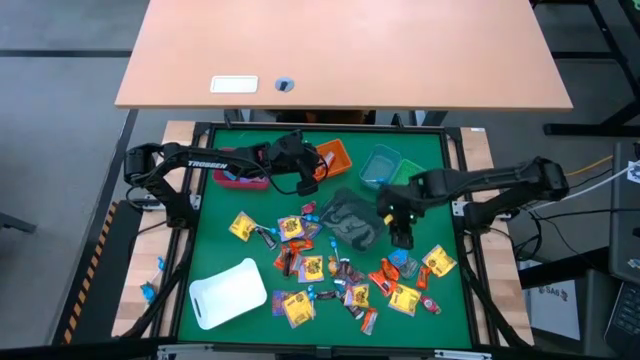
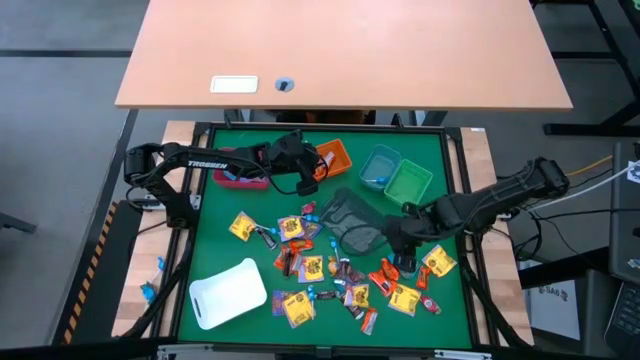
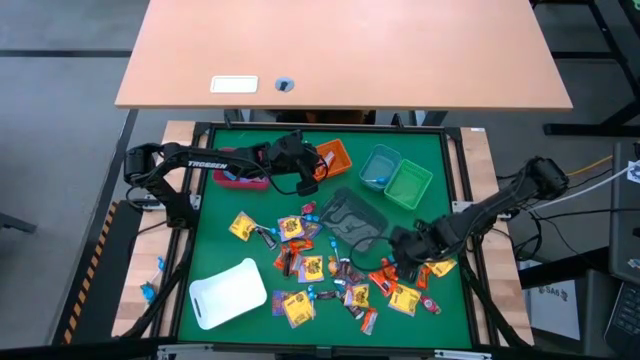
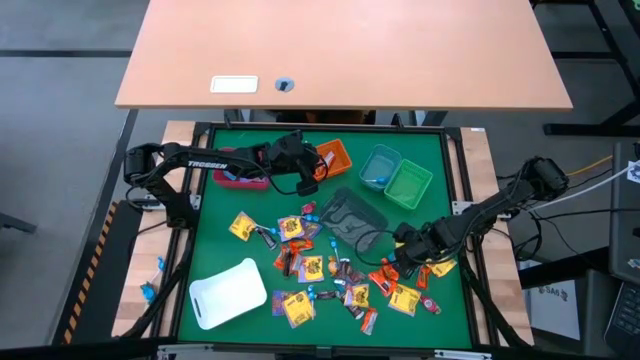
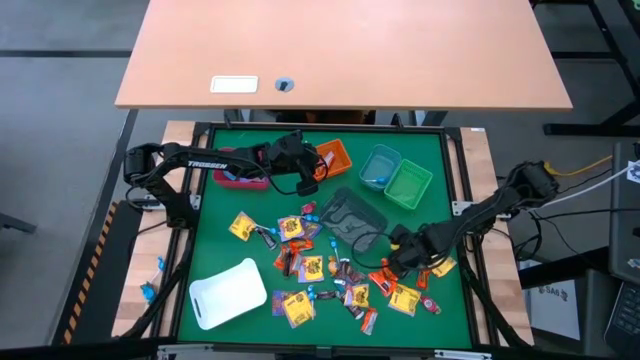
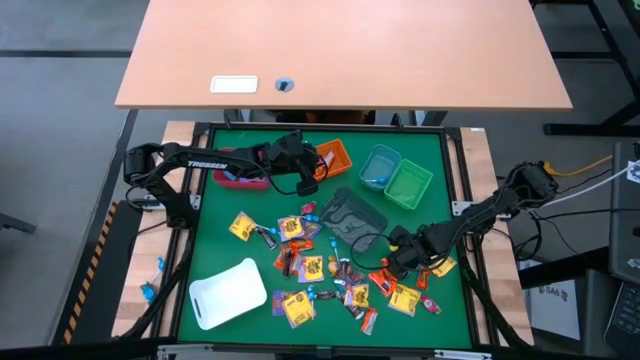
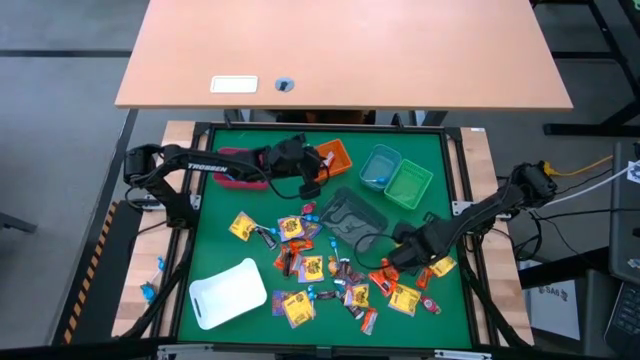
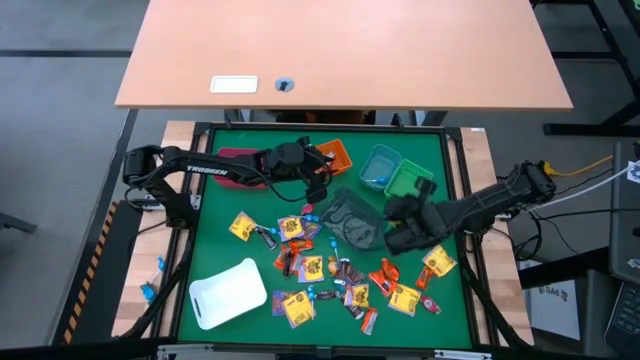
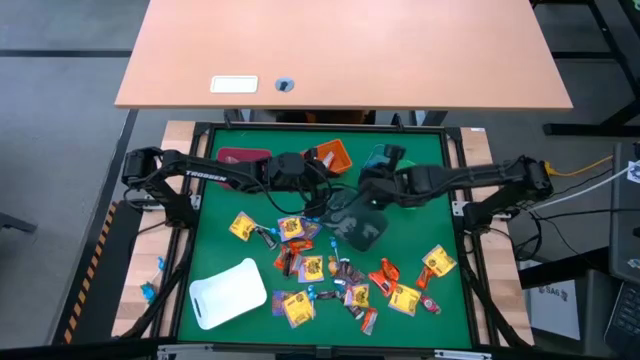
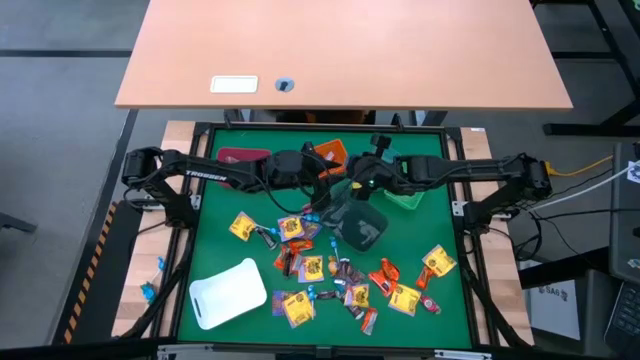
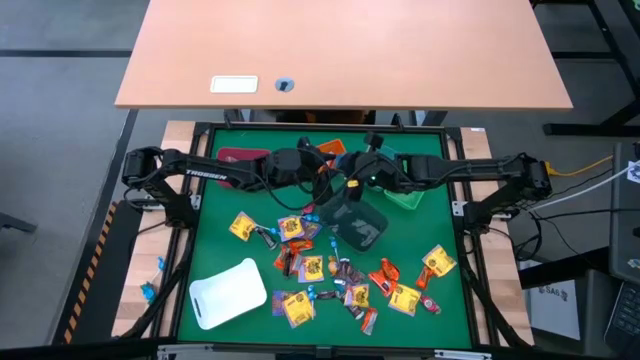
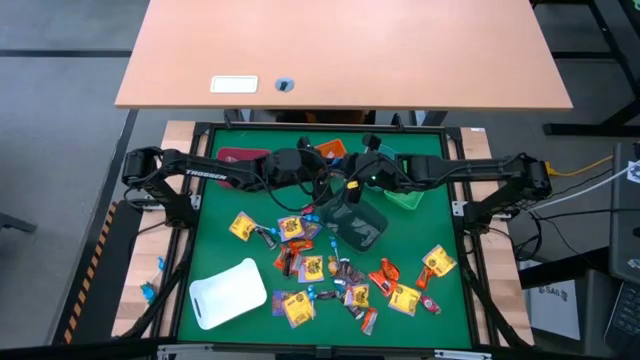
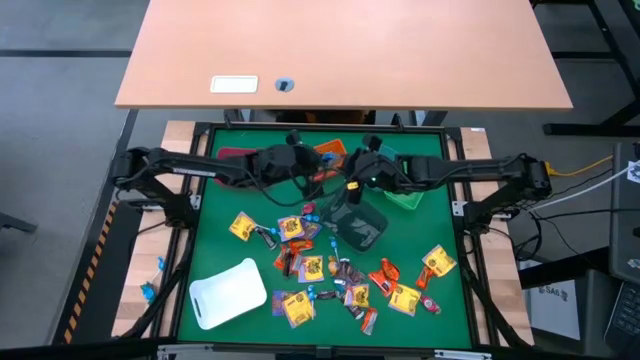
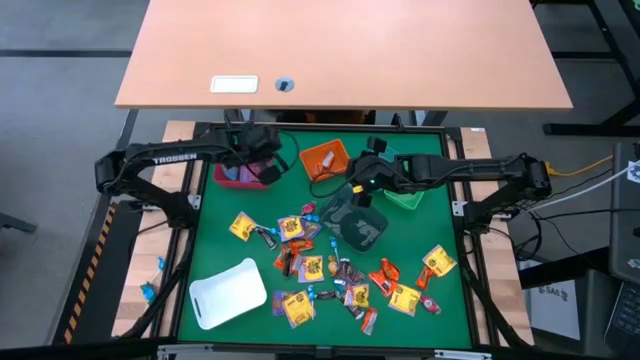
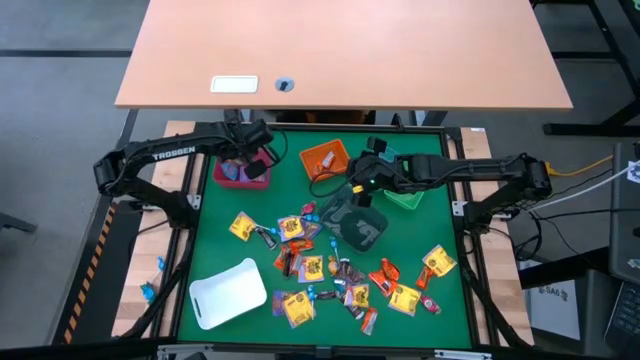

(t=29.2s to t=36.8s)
Task: Sort candy
Put the blue gummy pack into the red bin

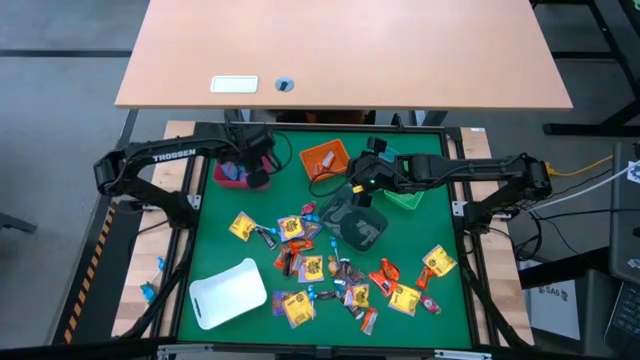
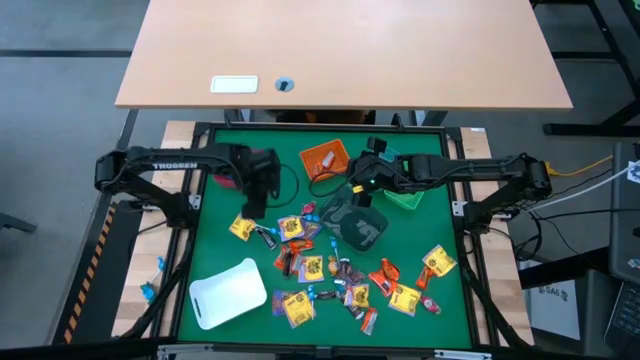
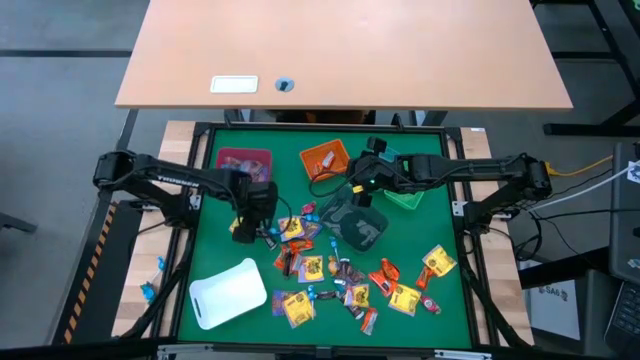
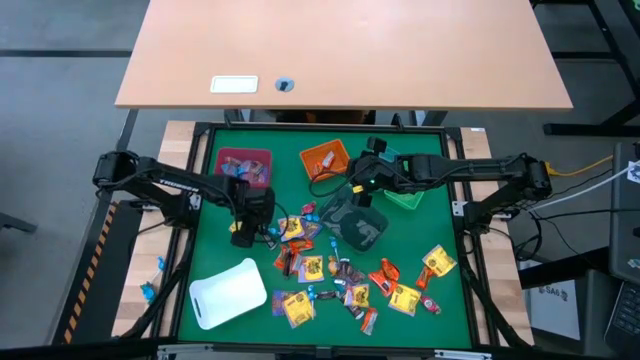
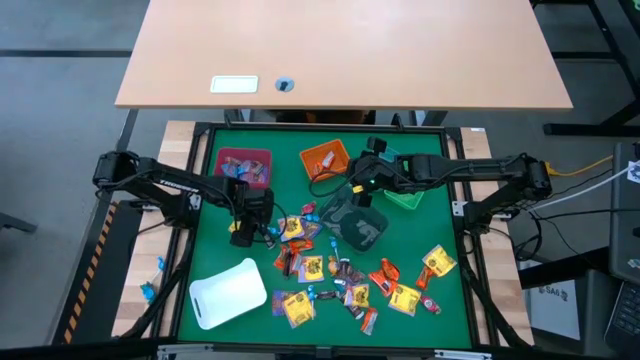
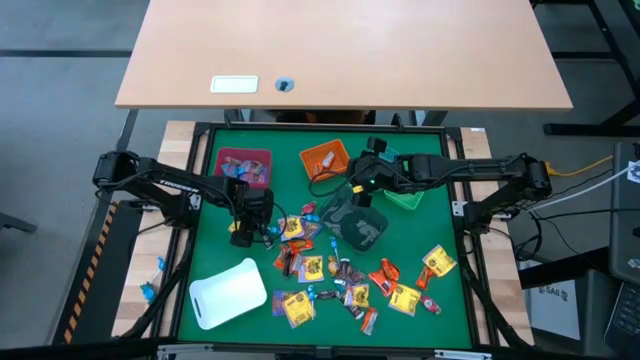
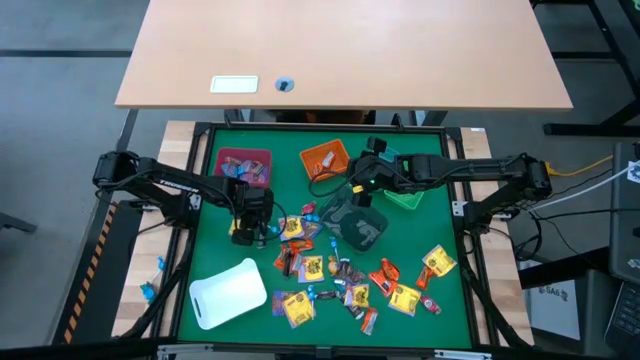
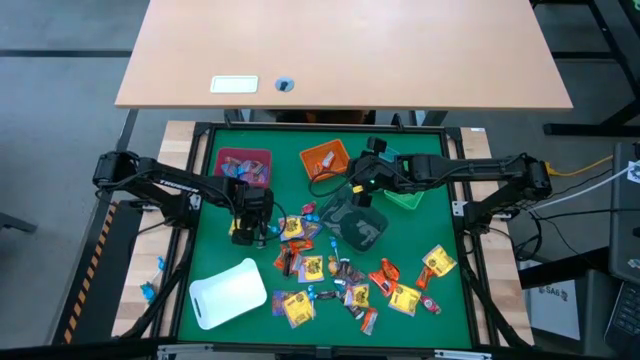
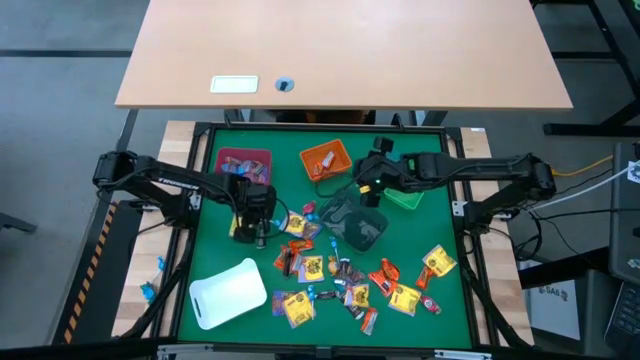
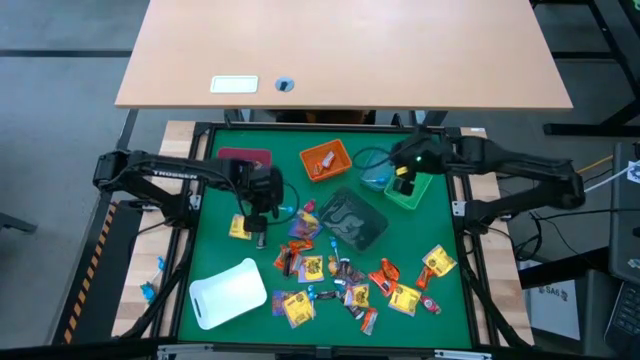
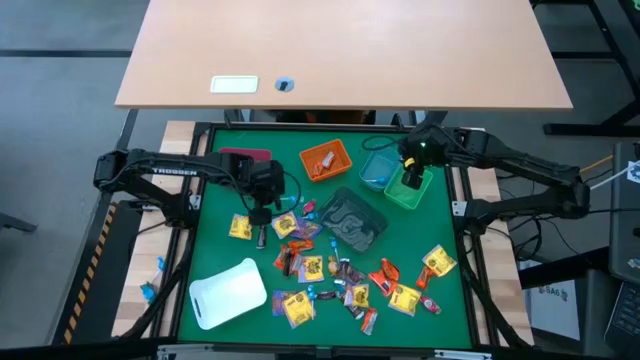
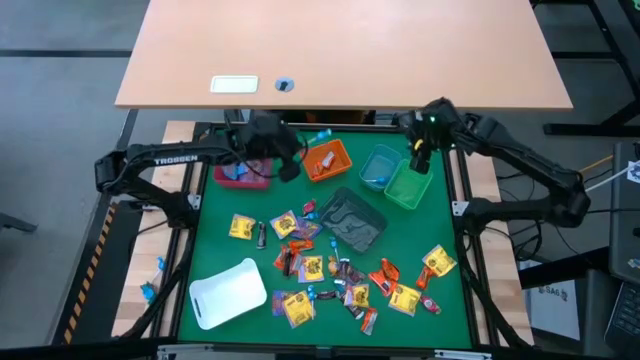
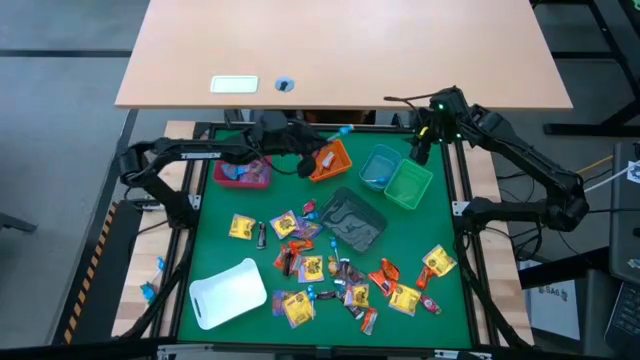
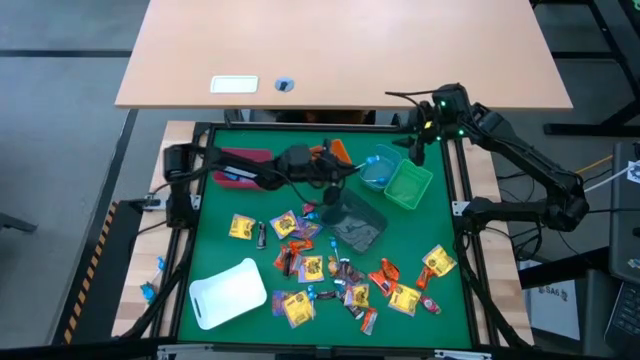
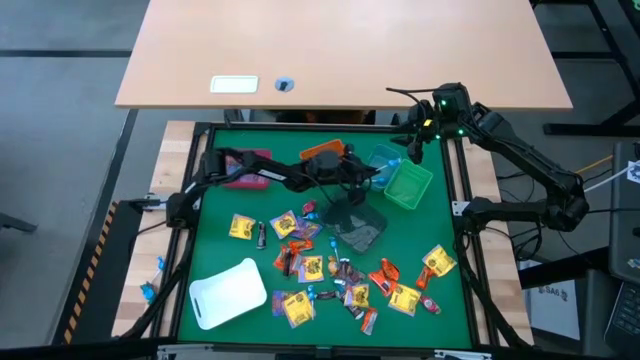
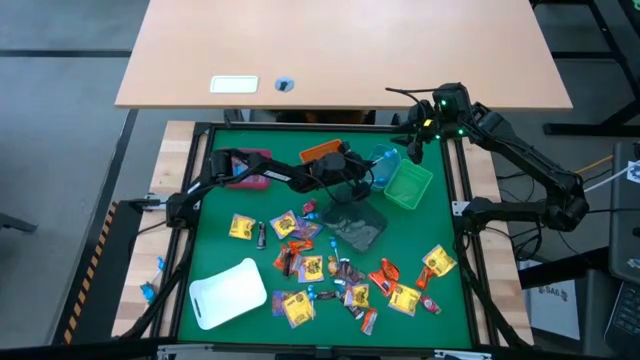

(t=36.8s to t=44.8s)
Put the blue lollipop into the blue bin

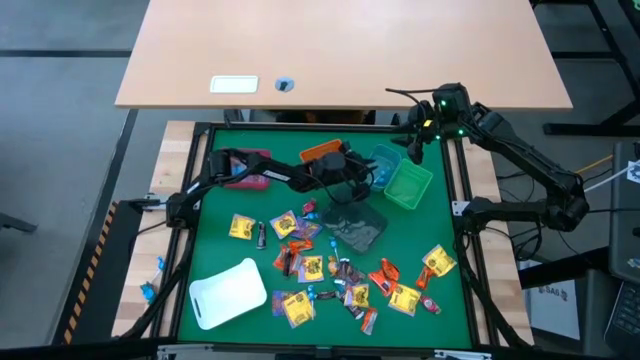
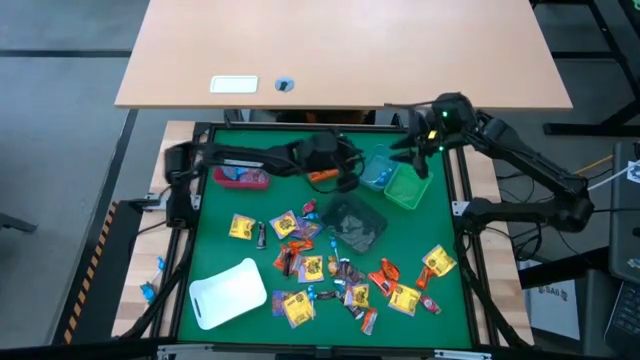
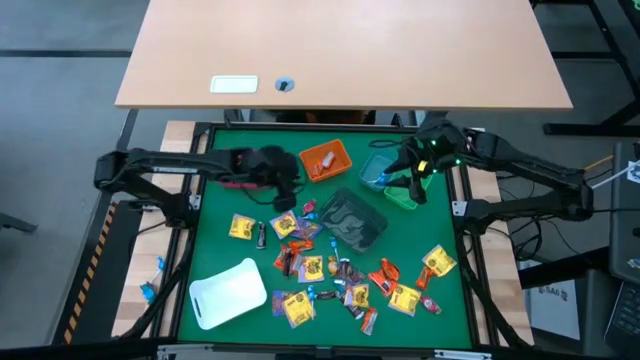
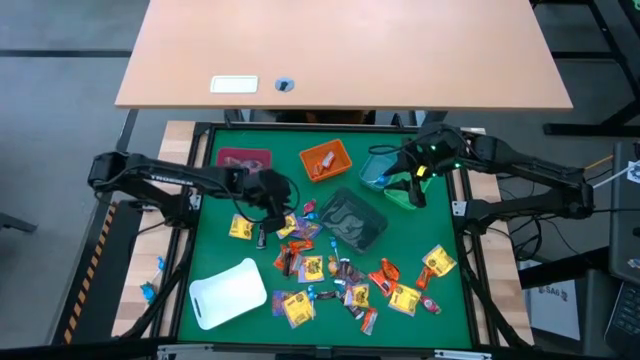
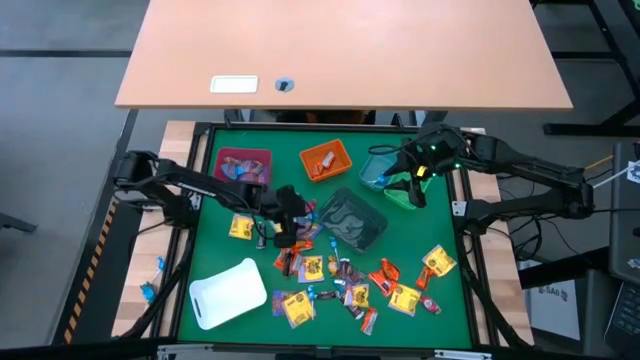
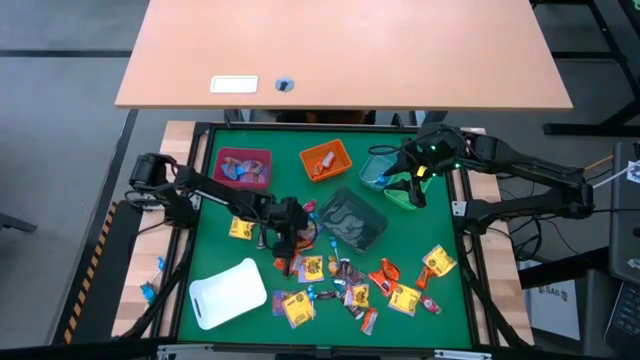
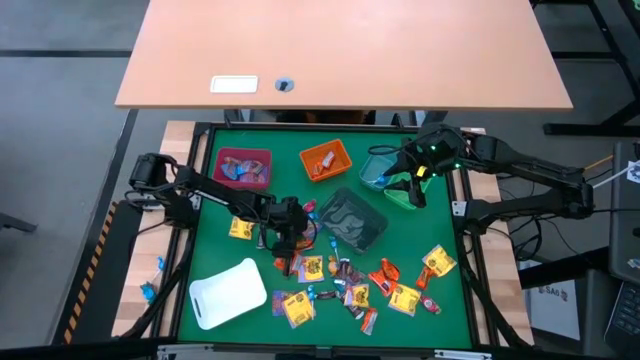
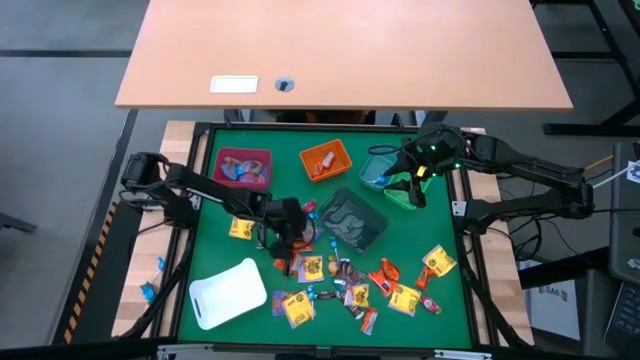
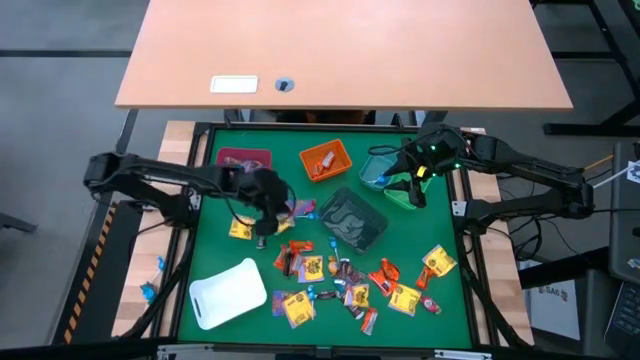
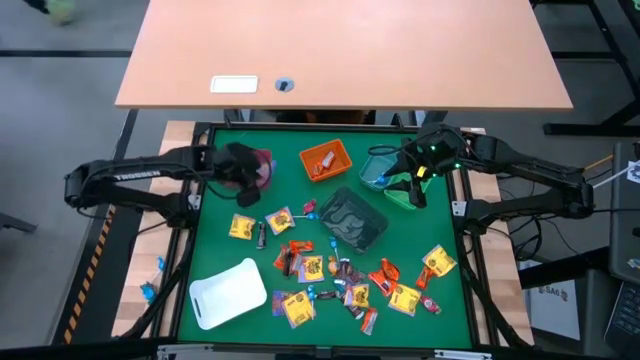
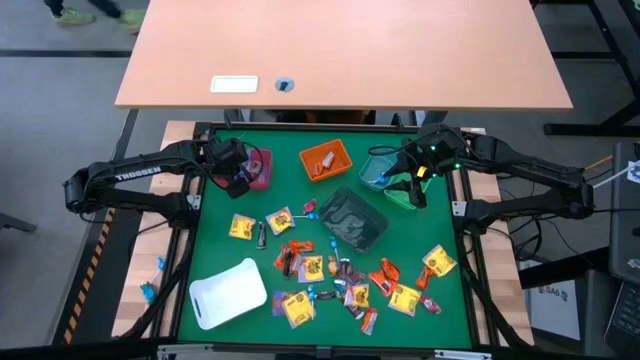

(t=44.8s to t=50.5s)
Put the purple gummy pack into the red bin
